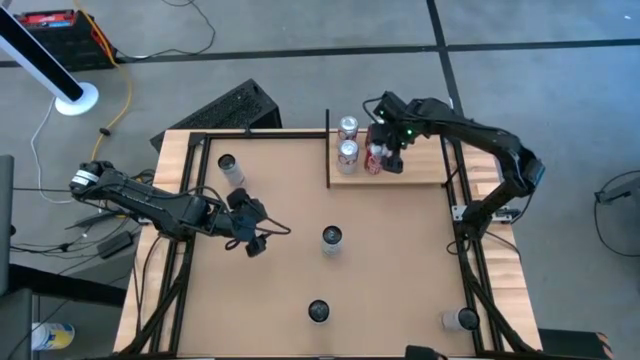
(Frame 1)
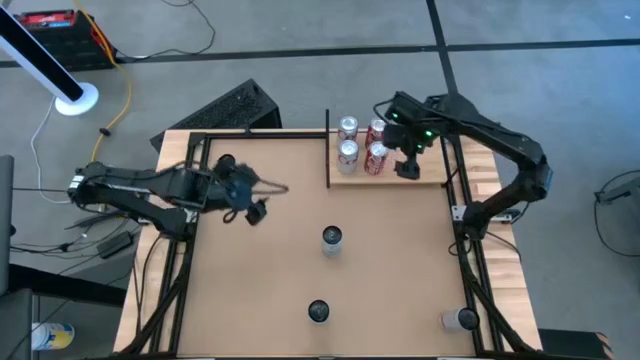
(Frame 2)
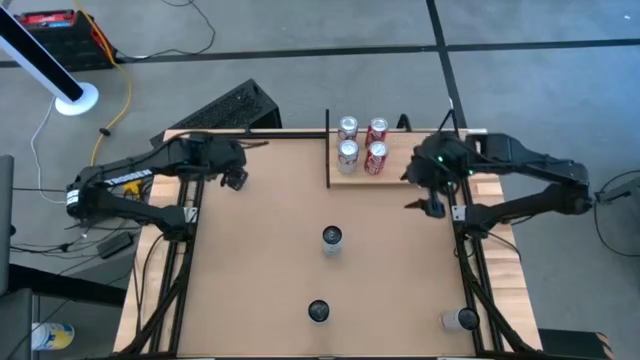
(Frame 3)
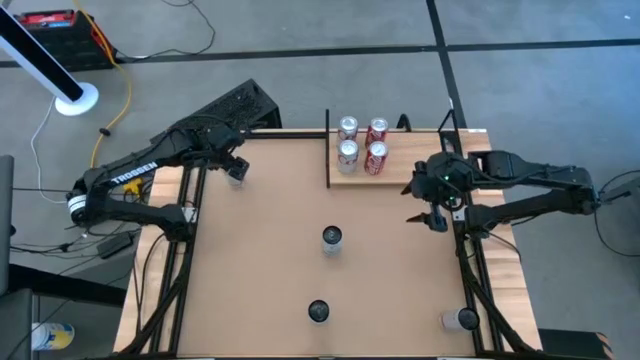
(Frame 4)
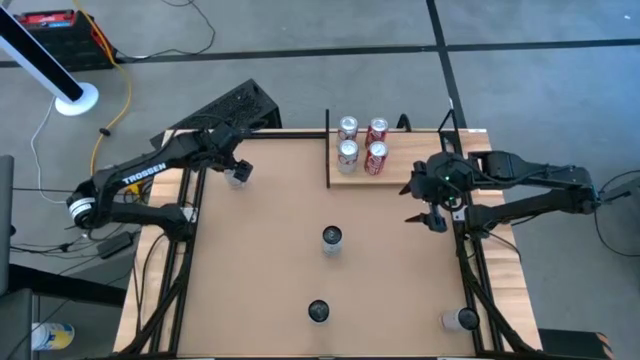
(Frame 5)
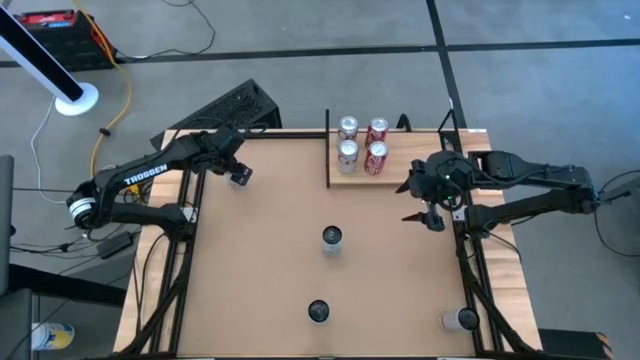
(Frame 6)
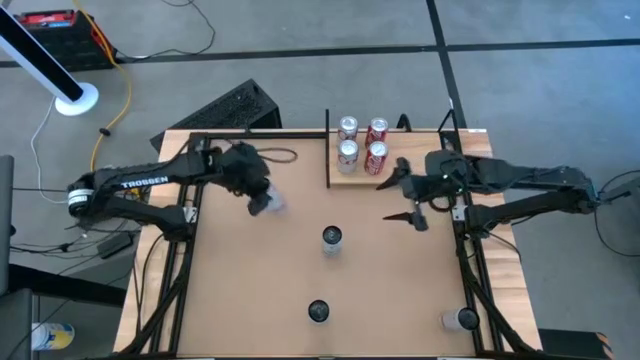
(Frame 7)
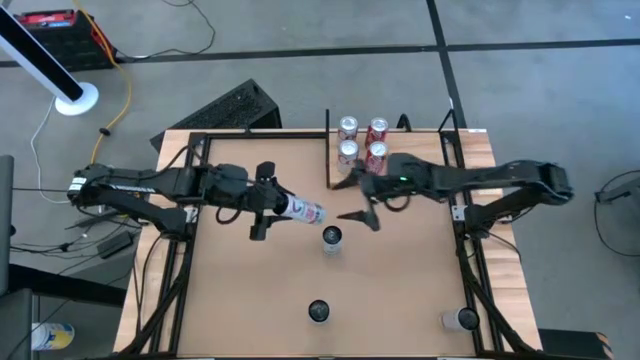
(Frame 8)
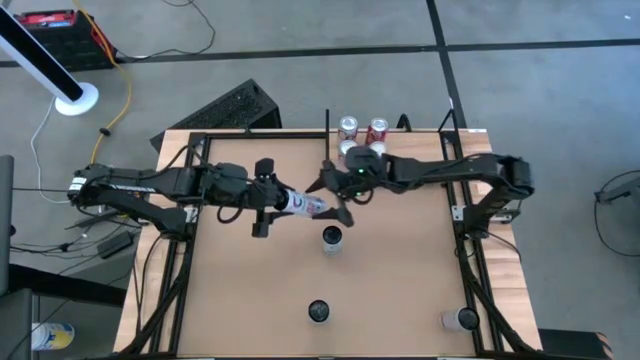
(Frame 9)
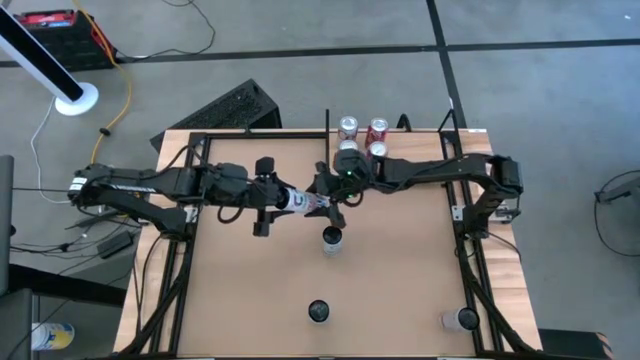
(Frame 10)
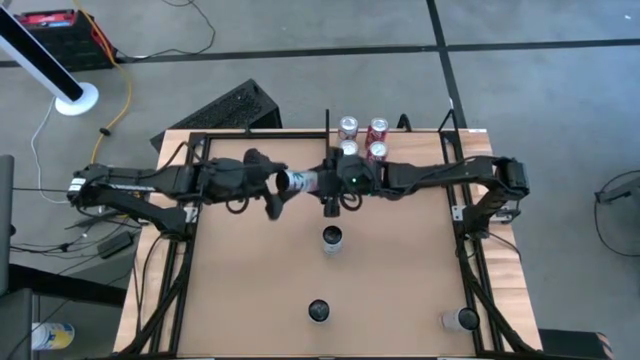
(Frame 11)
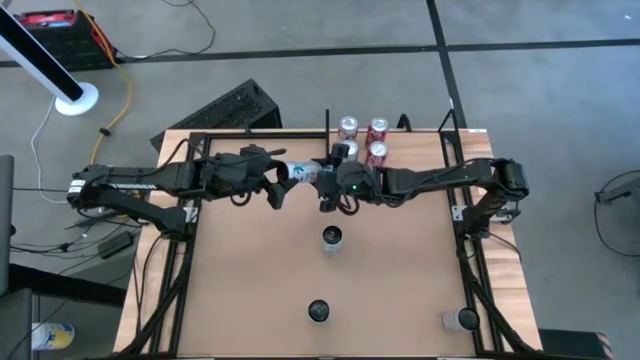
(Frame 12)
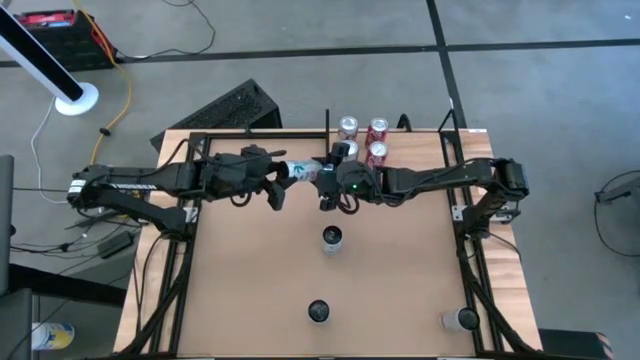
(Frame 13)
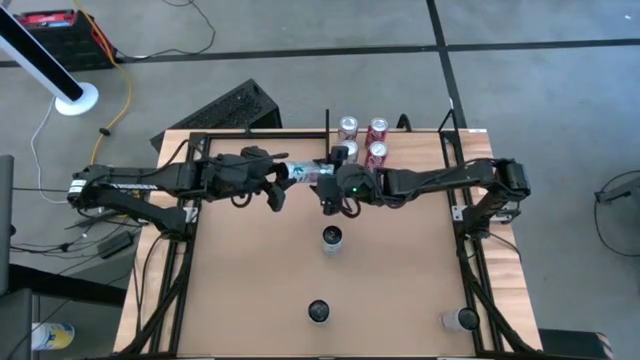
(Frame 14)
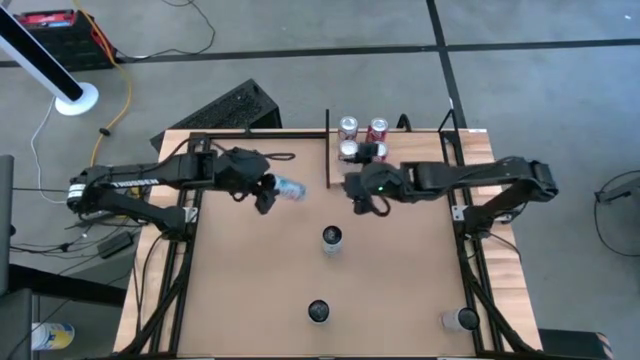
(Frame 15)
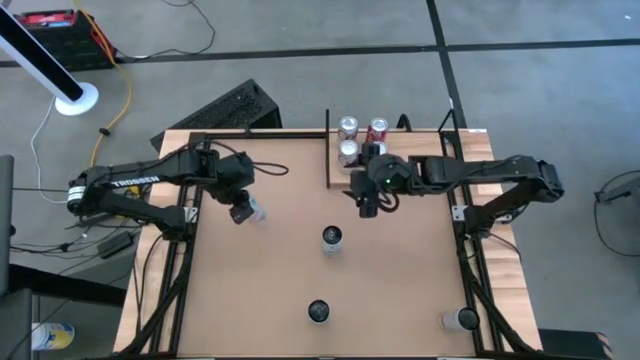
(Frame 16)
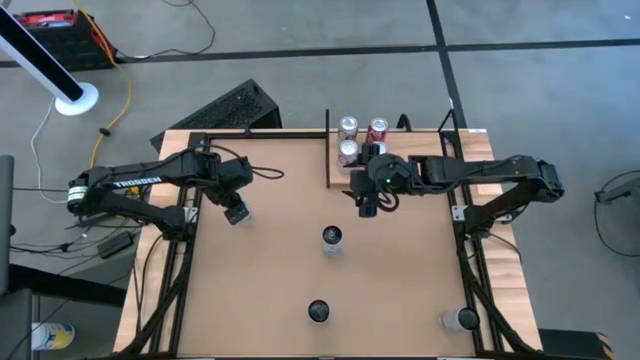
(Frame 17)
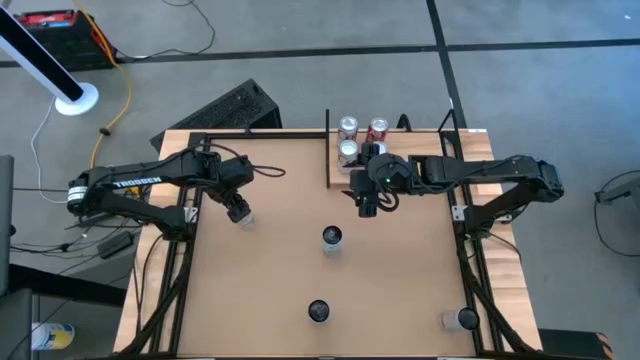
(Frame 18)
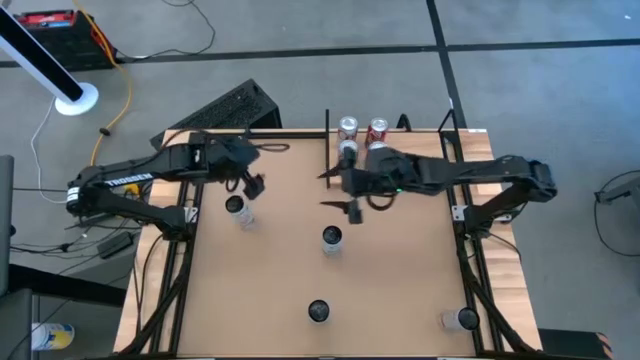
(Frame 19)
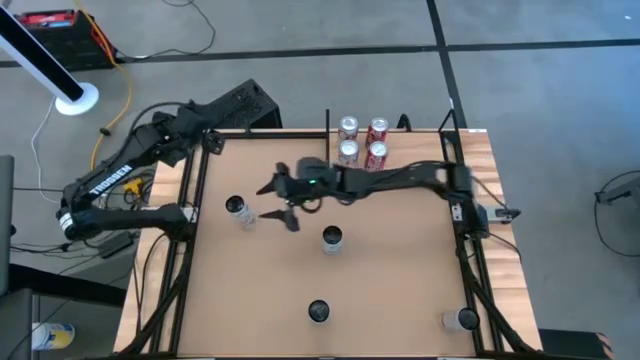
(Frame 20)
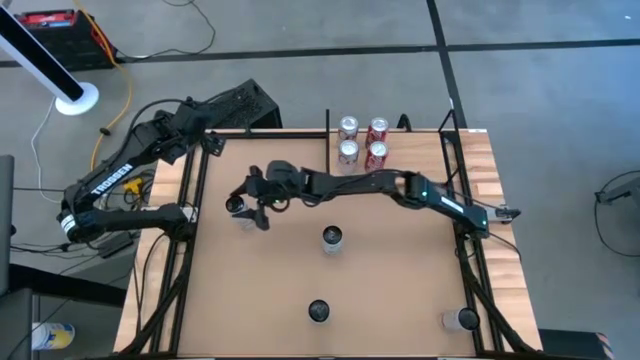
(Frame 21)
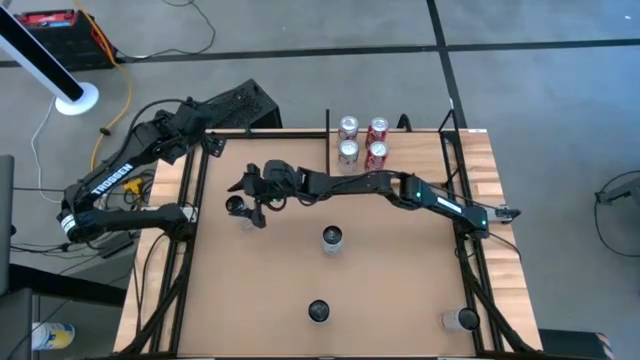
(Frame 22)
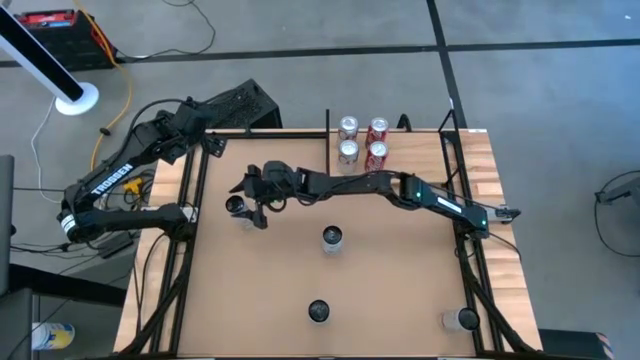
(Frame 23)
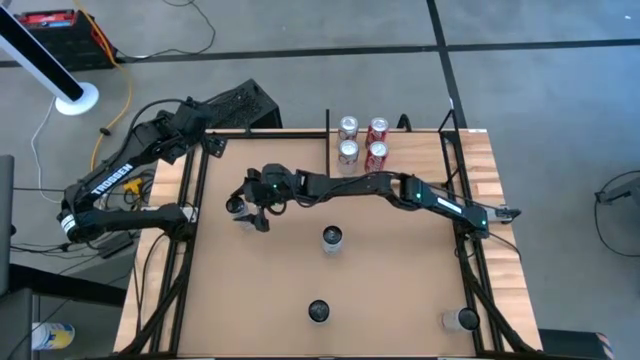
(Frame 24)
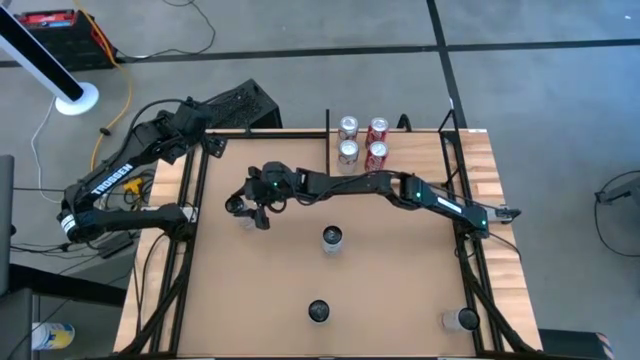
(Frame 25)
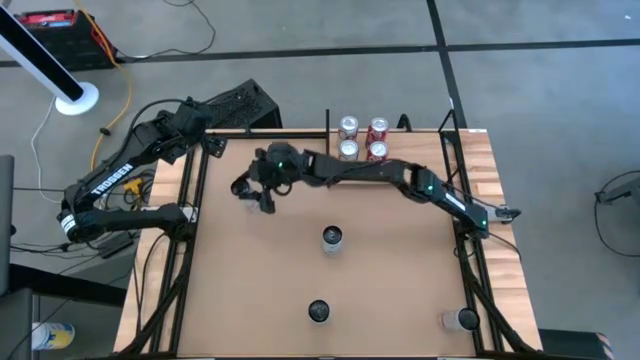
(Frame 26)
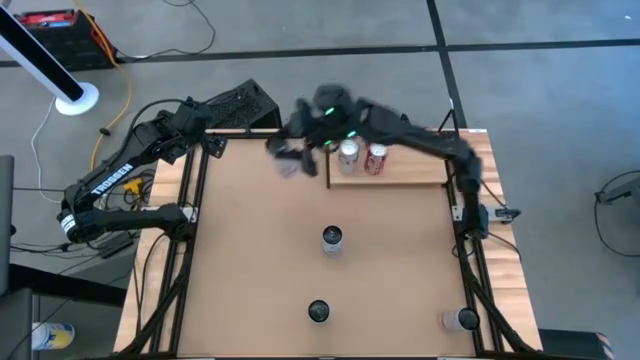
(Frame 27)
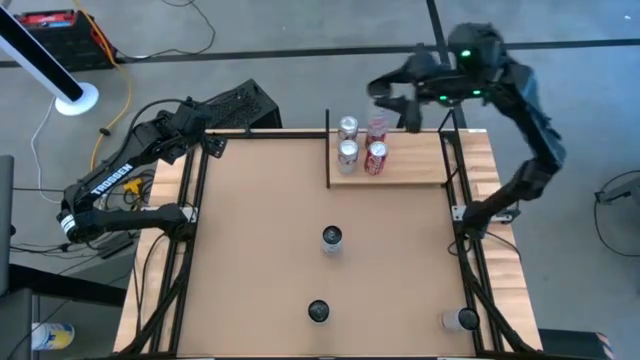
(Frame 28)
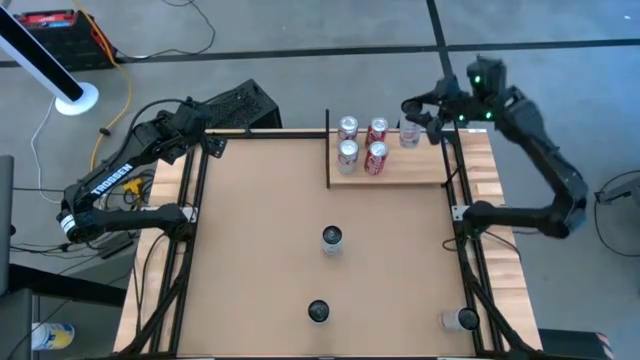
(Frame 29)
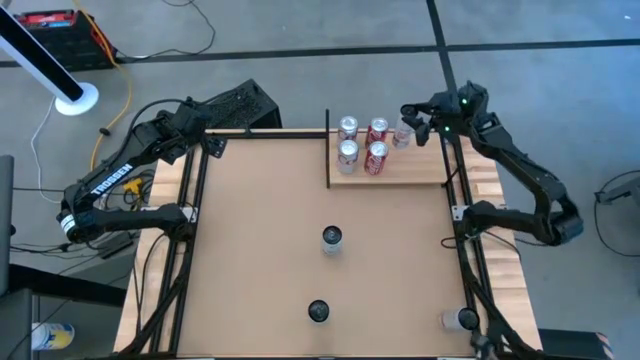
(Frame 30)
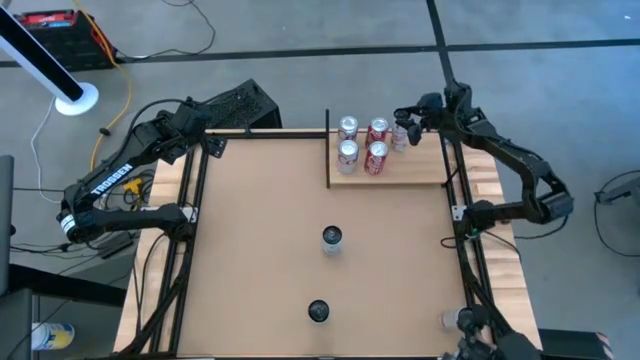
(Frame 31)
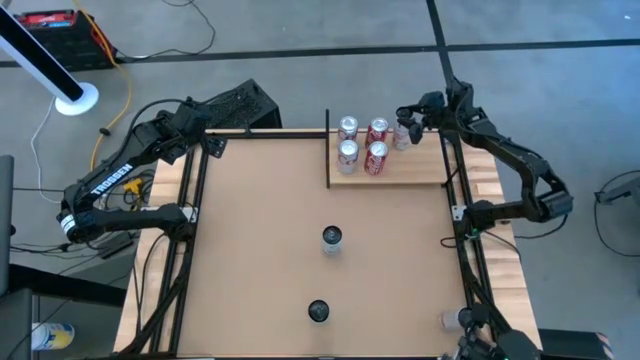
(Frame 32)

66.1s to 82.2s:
Task: Place canned beverage on shelf
Put the left white-pink soda can on the shelf

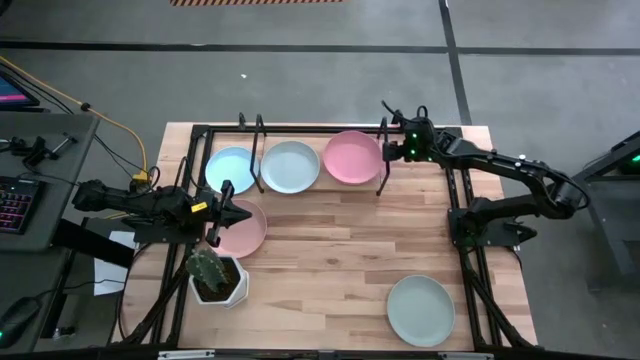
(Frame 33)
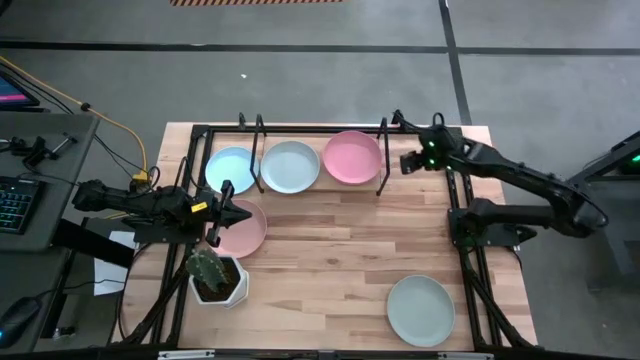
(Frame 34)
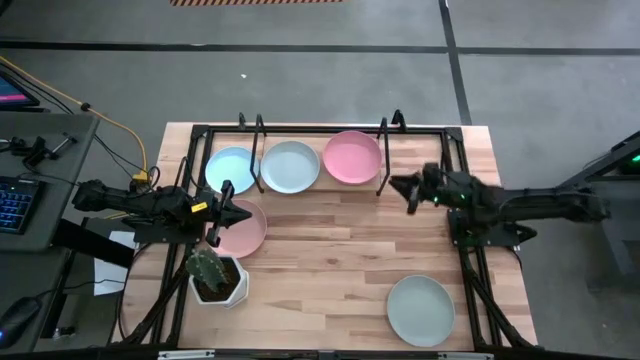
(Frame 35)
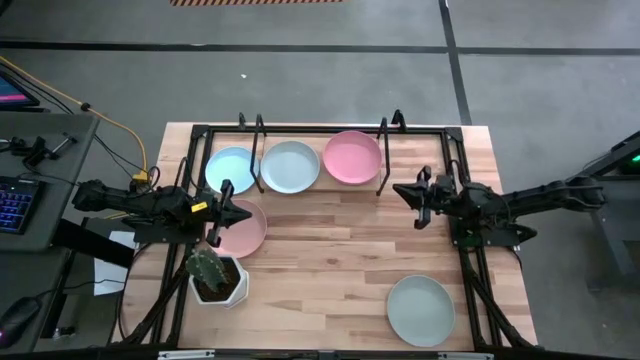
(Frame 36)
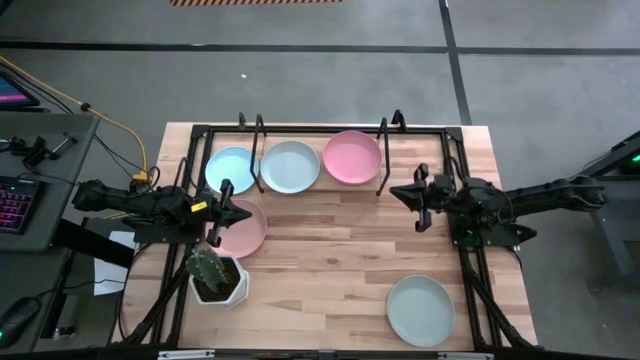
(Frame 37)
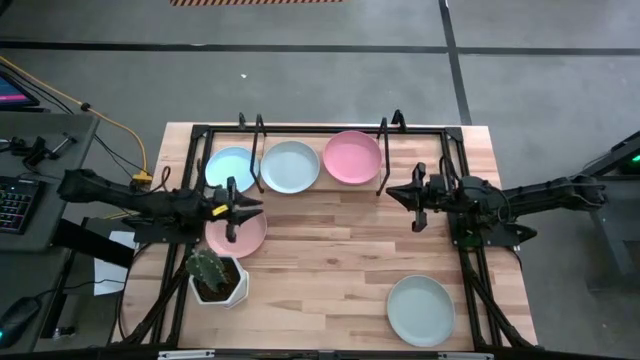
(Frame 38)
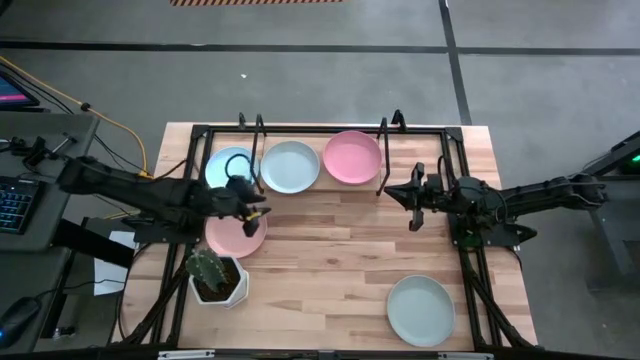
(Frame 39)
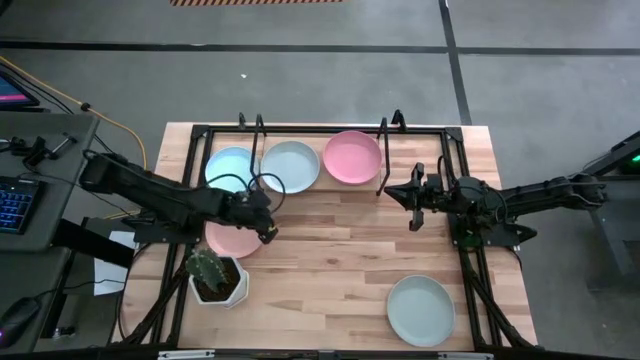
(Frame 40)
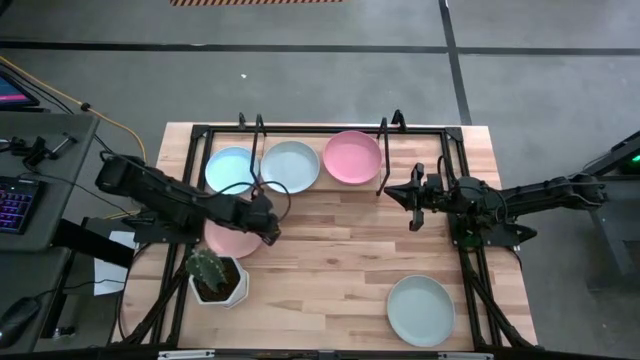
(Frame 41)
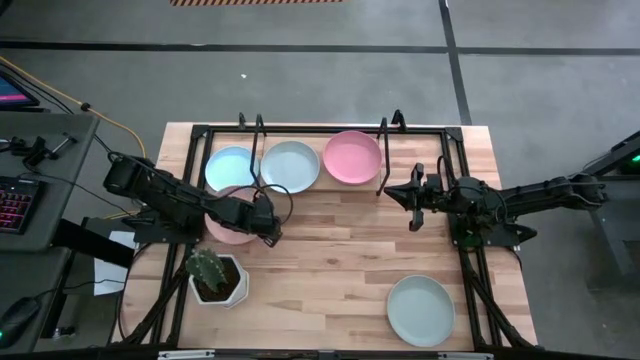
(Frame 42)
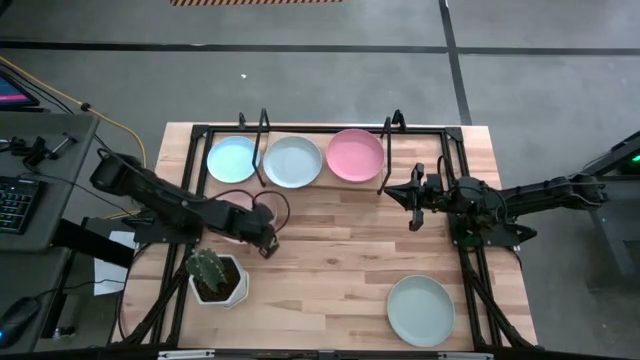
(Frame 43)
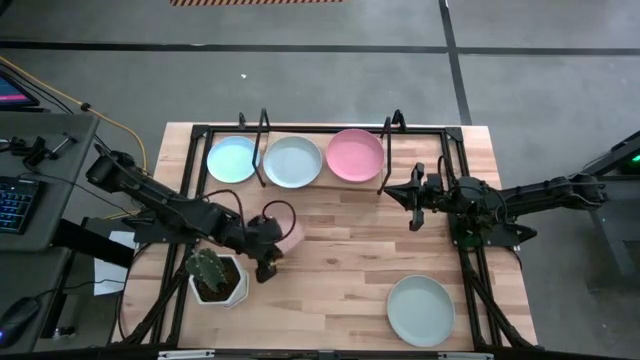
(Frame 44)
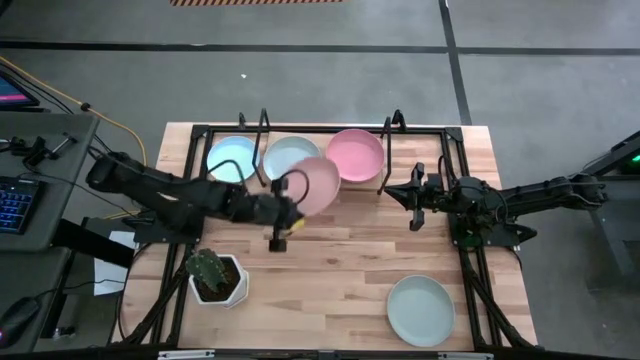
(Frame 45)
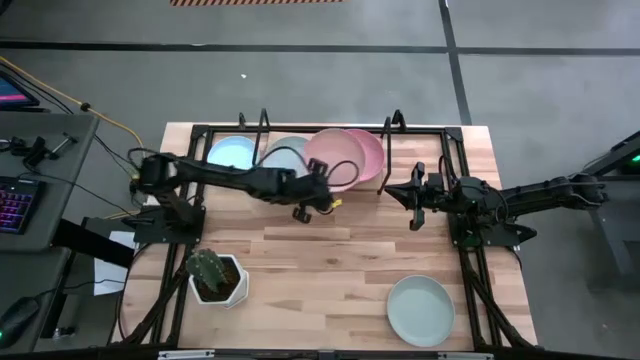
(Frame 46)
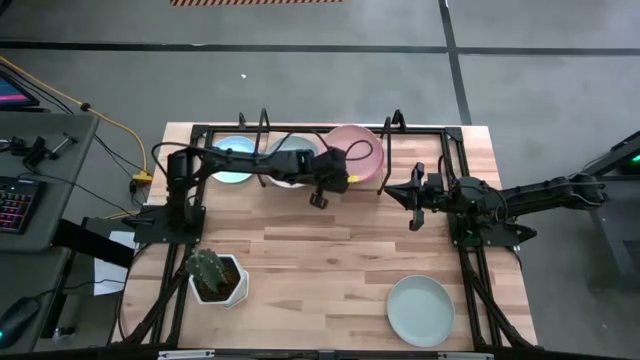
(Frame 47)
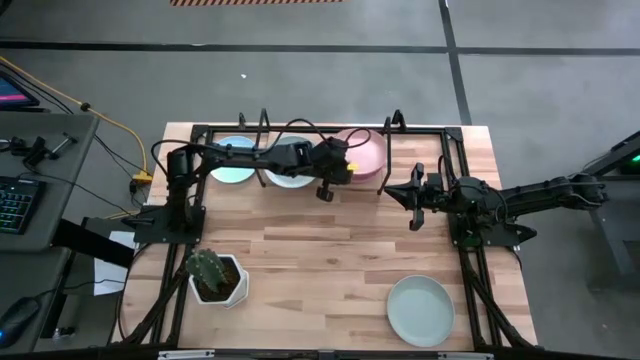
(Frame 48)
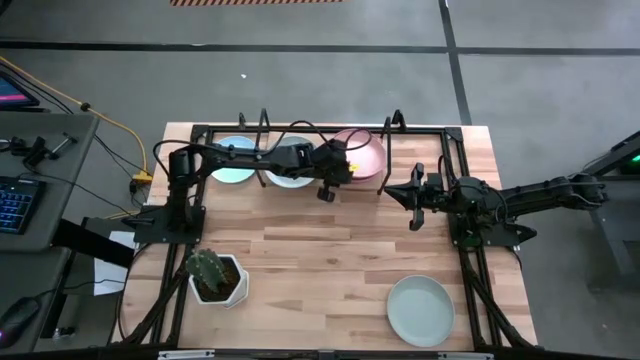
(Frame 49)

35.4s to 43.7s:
Task: Place and stack plates onto a shelf
Stack the light pink plate on top of the pink plate on the shelf
